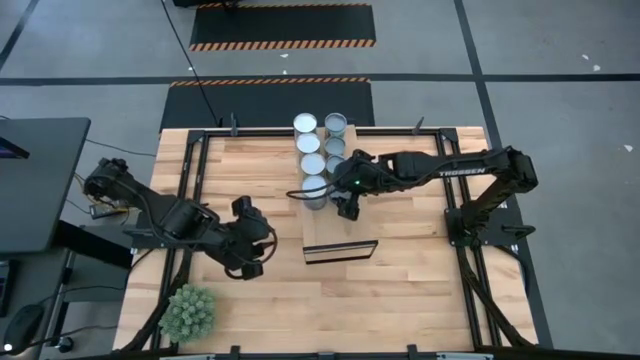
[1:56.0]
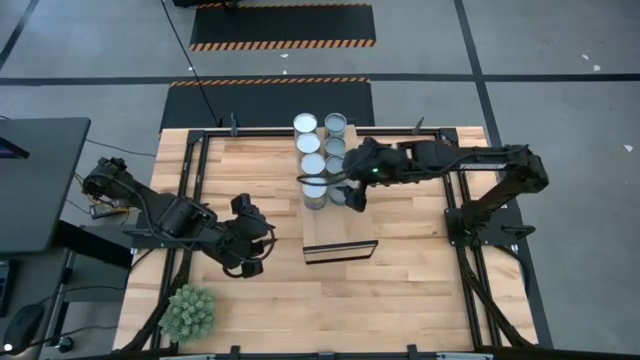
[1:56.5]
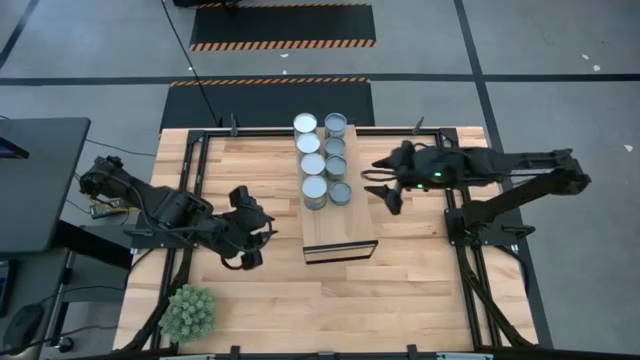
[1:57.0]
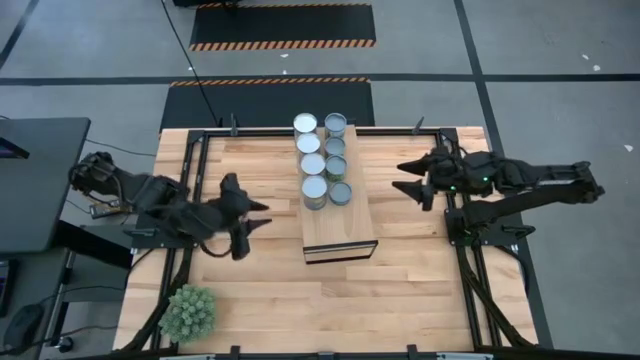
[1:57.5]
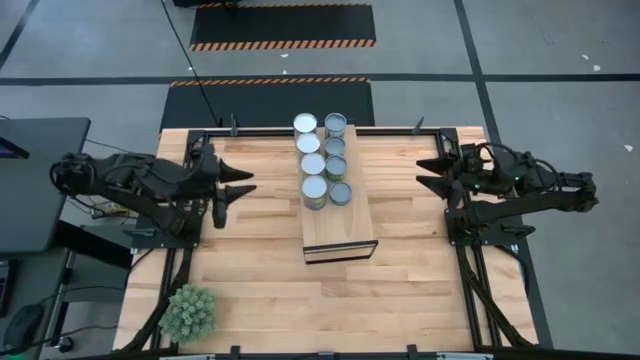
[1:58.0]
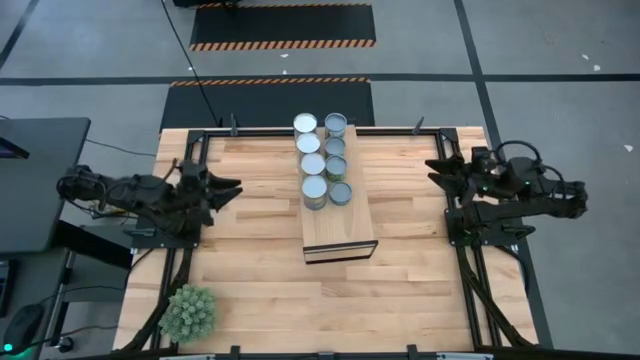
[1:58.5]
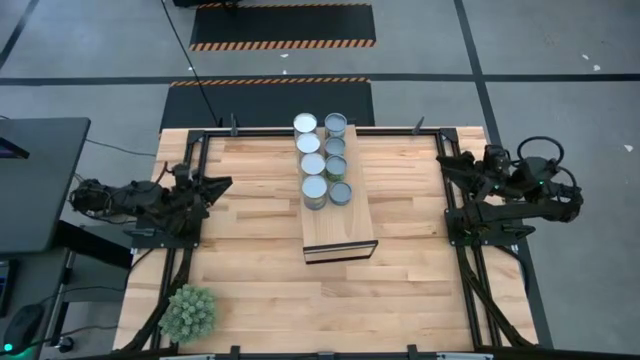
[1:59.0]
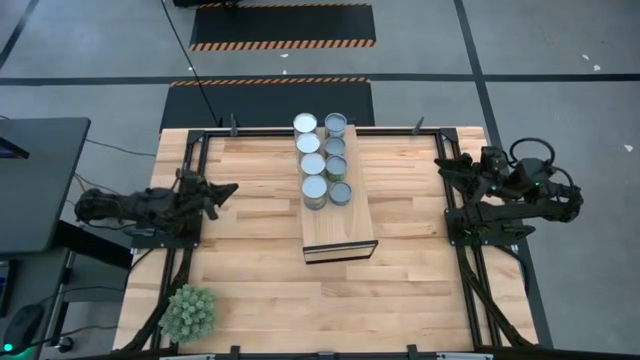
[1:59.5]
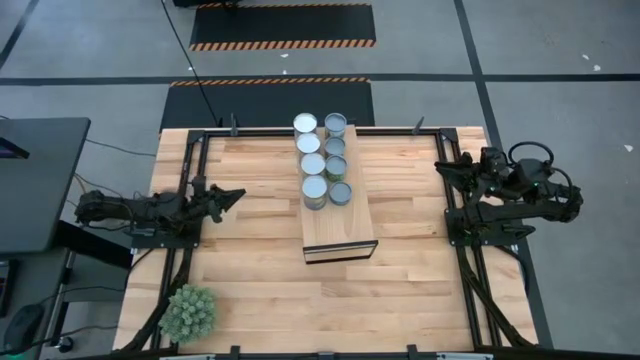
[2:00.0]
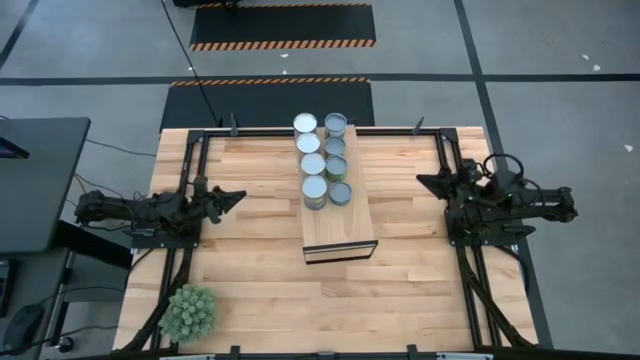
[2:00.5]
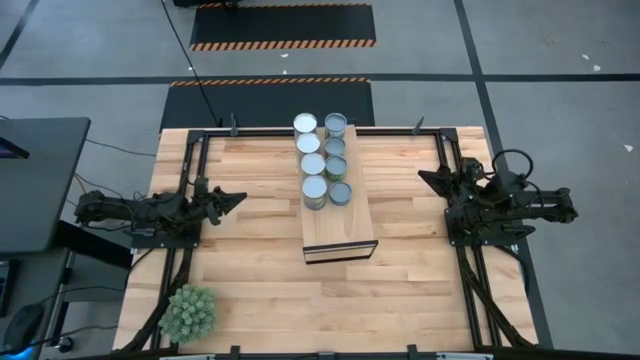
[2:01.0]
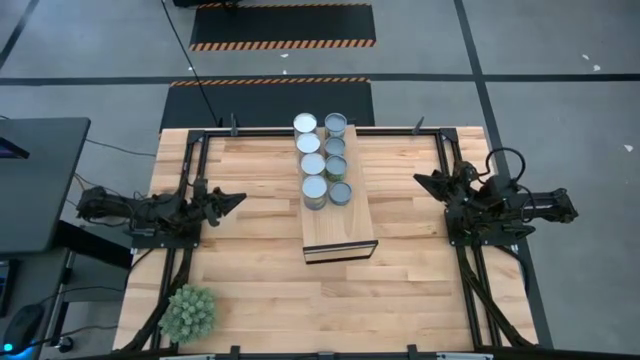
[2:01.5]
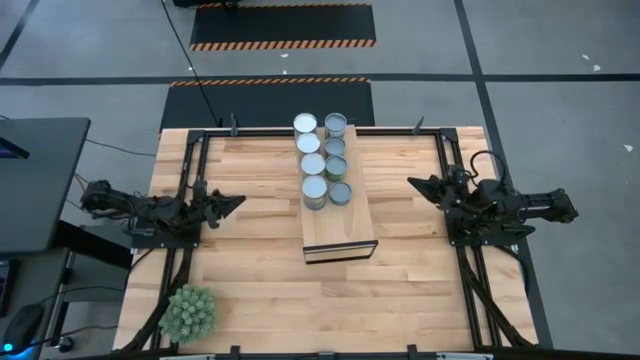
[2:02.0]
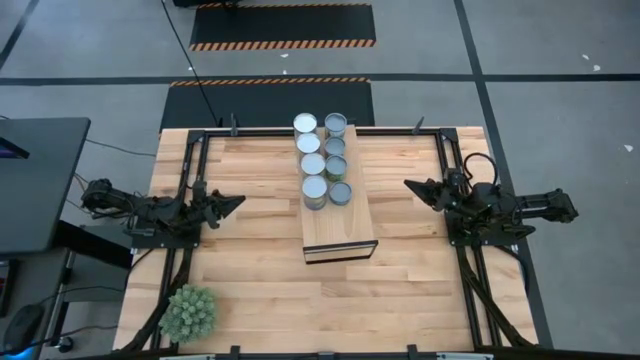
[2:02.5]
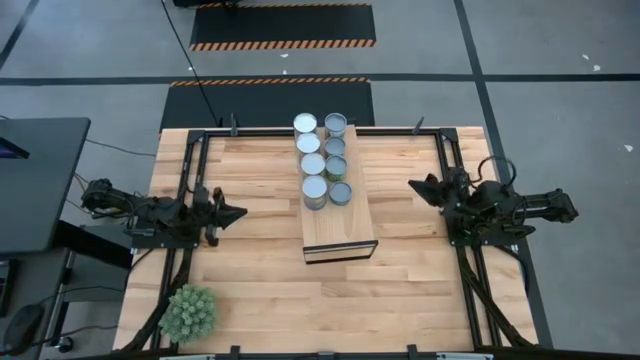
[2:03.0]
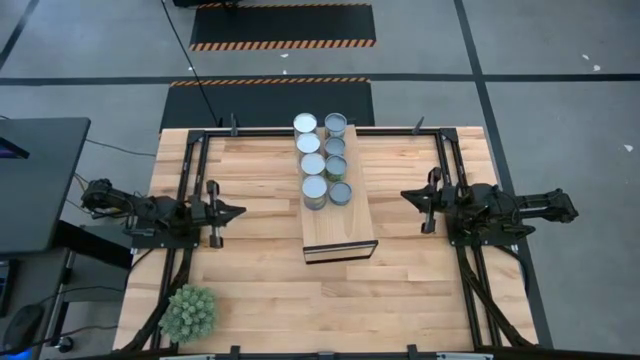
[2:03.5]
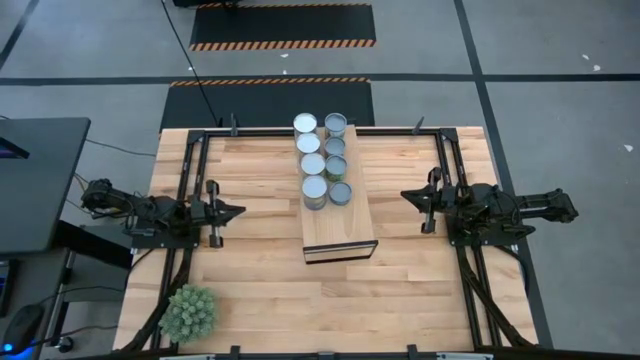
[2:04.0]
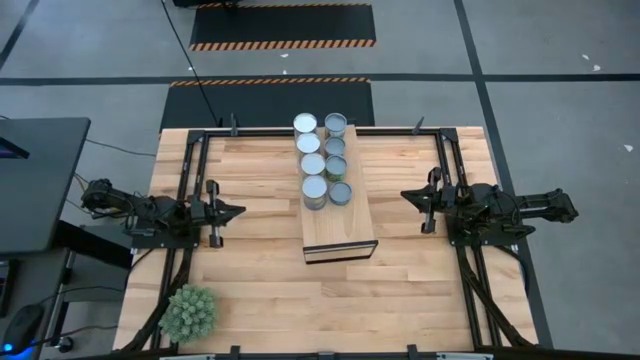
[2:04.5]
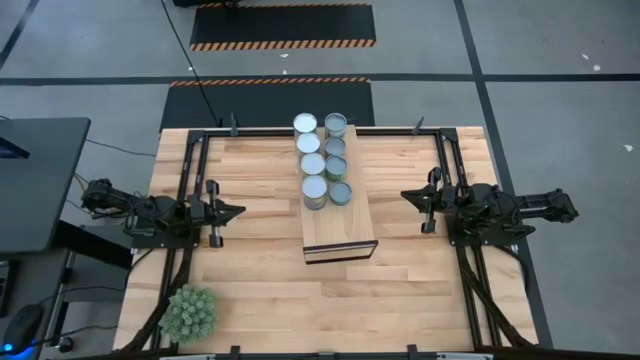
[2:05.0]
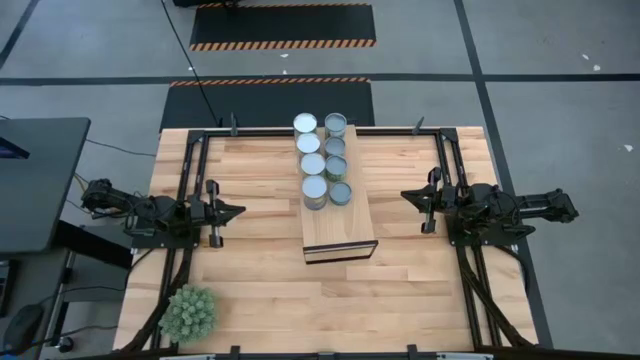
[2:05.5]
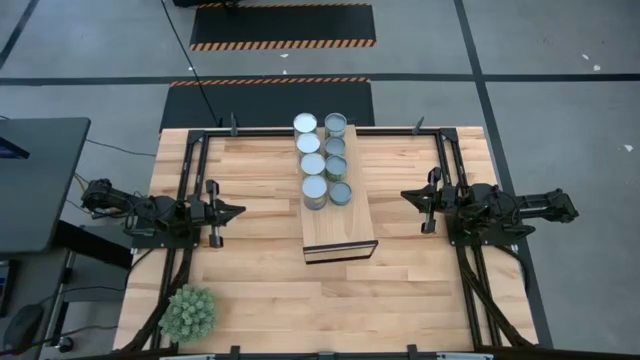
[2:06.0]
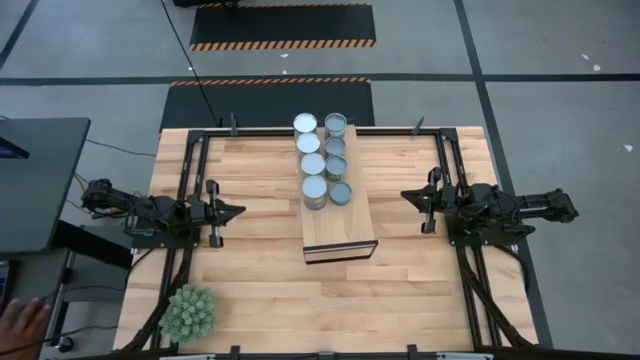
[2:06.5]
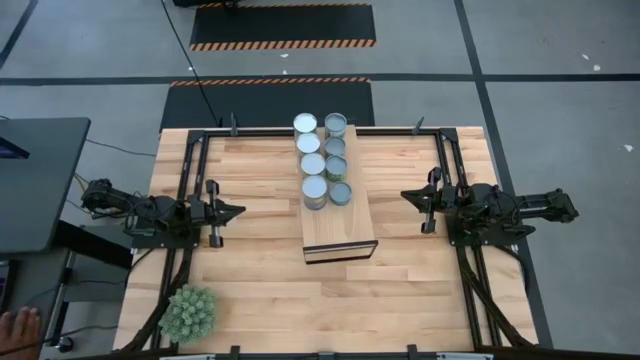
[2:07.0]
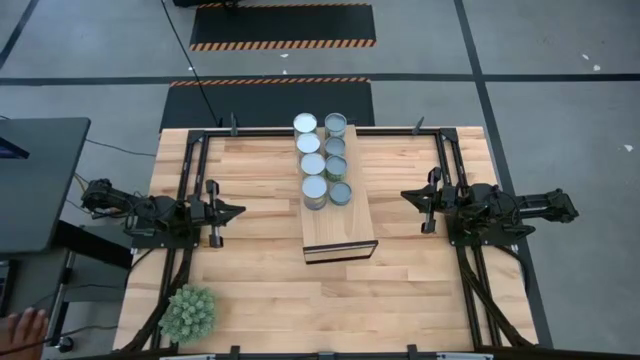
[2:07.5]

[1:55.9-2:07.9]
Task: Pick and place cans onto a shelf
Return to Home Position

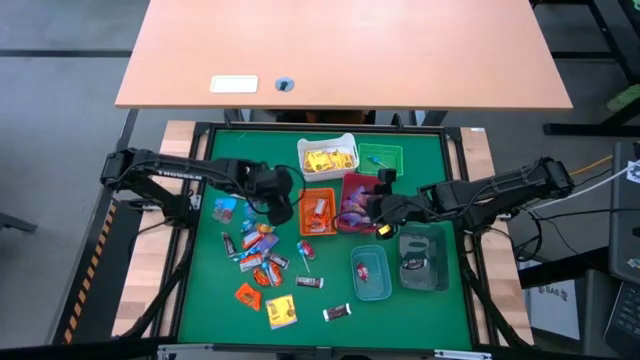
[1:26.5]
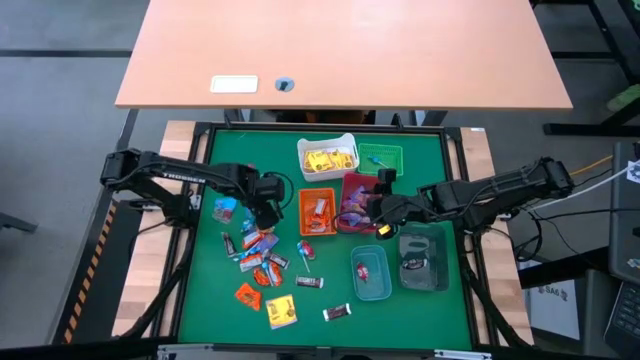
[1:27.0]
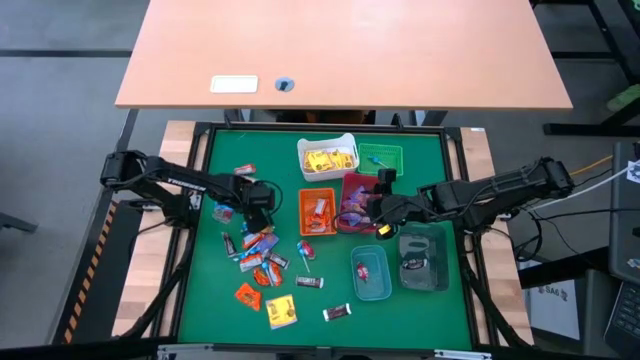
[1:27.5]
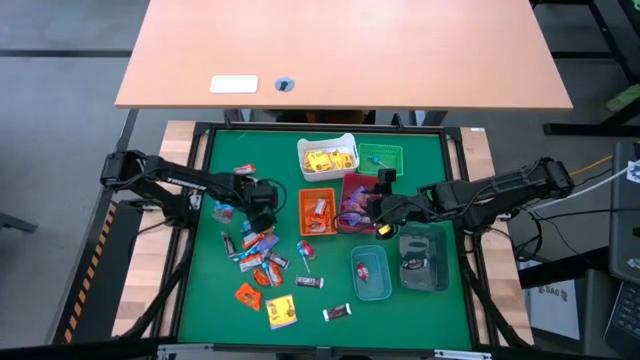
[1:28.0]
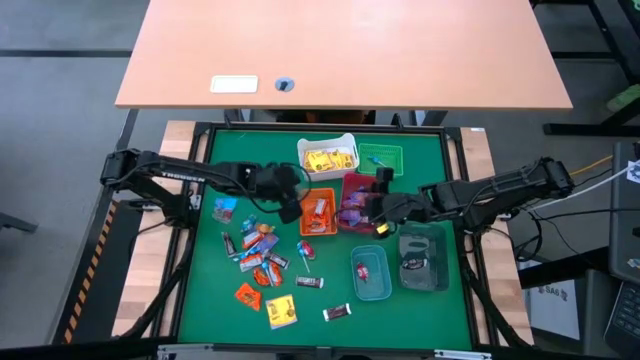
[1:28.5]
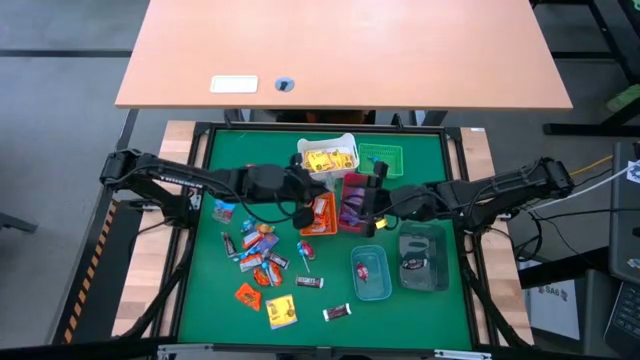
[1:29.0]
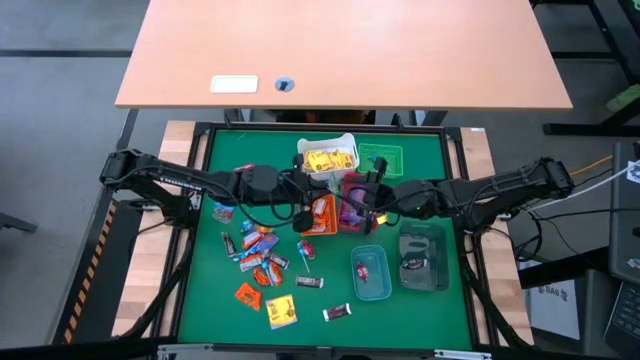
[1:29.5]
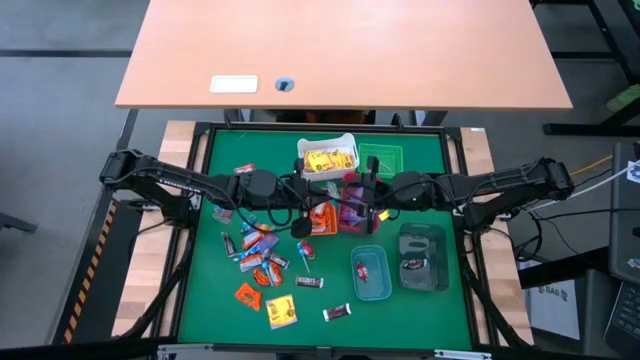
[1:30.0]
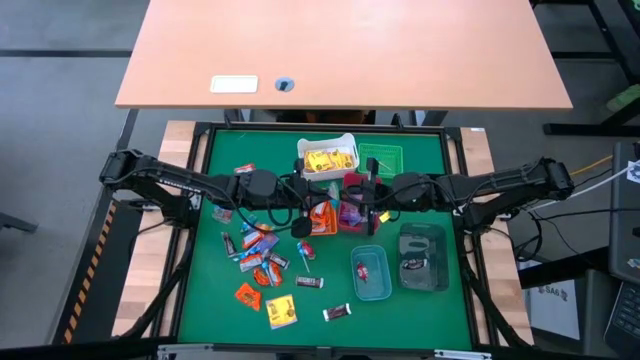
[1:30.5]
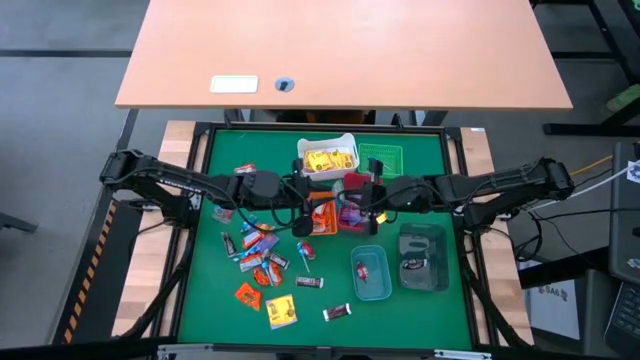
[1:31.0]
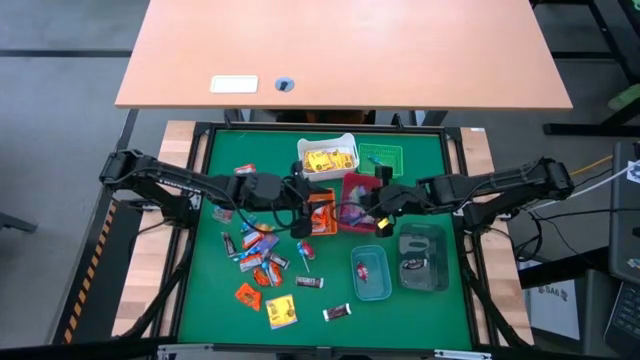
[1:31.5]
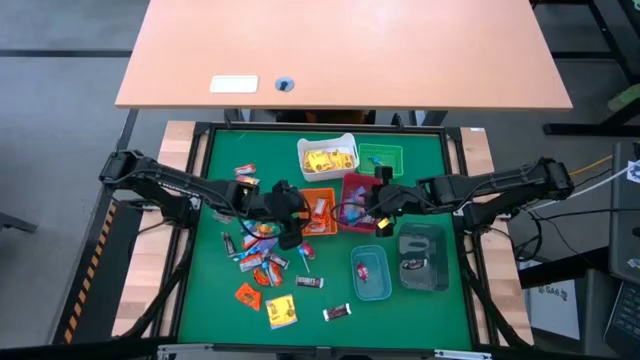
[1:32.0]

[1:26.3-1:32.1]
Task: Sort candy
Put the blue bag of candy into the red bin

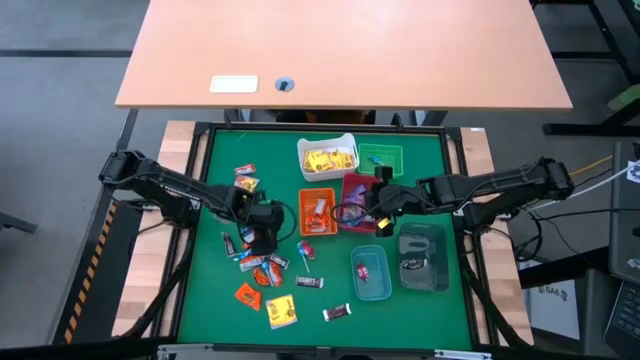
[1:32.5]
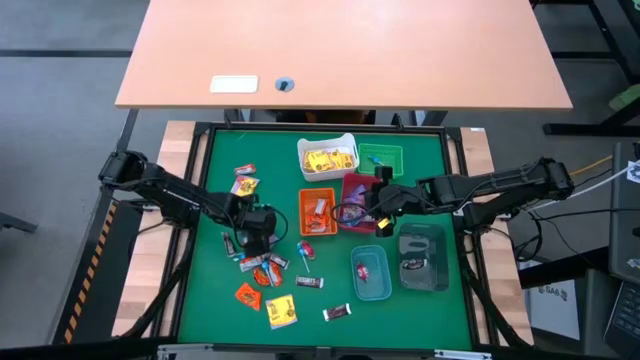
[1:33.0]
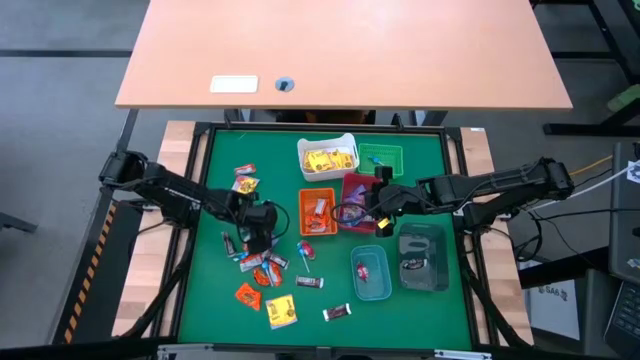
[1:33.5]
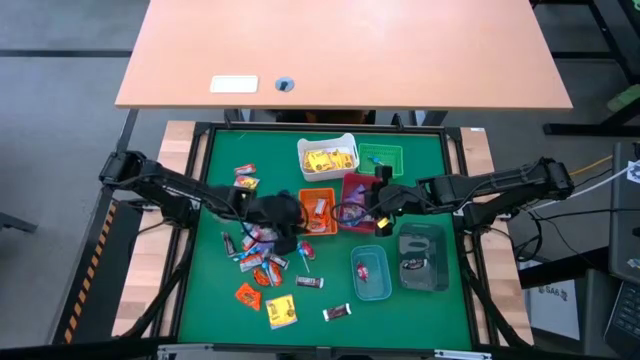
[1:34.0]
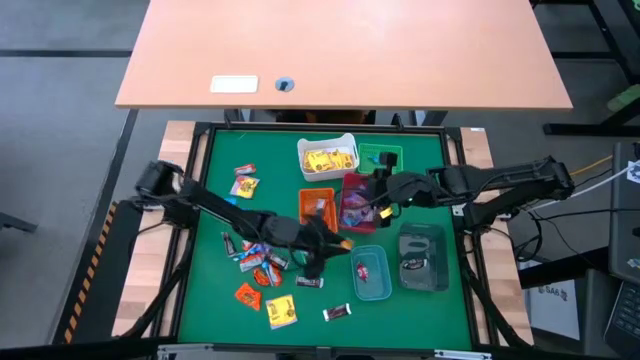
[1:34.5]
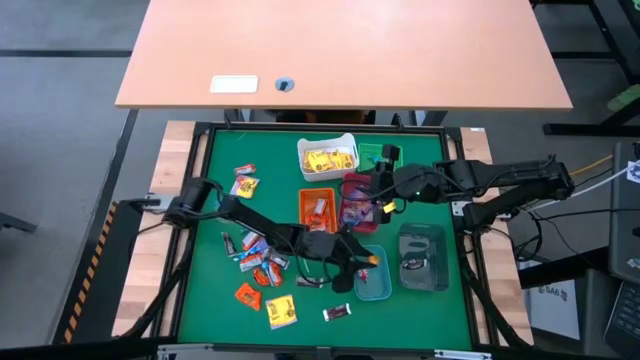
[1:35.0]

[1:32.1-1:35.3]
Put the yellow candy into the blue bin
